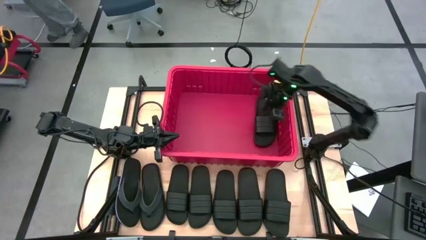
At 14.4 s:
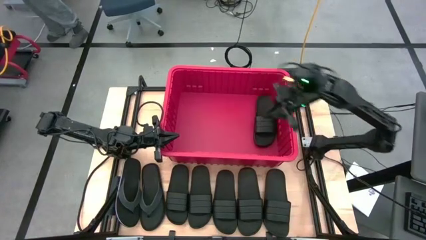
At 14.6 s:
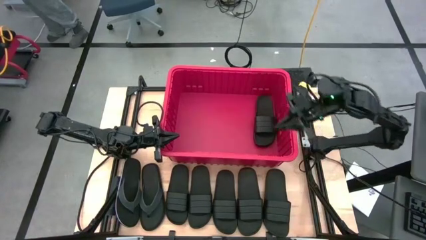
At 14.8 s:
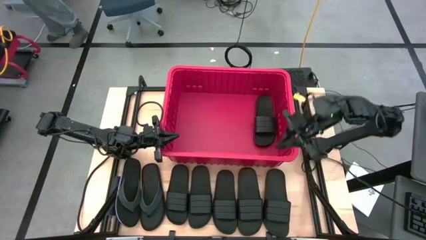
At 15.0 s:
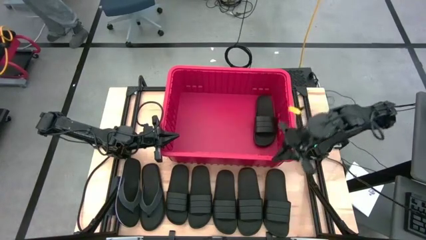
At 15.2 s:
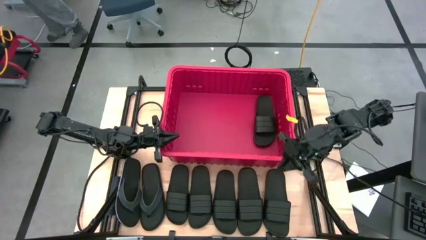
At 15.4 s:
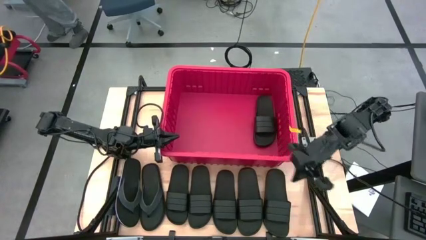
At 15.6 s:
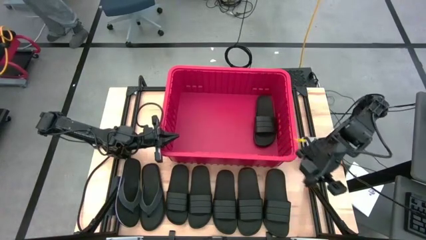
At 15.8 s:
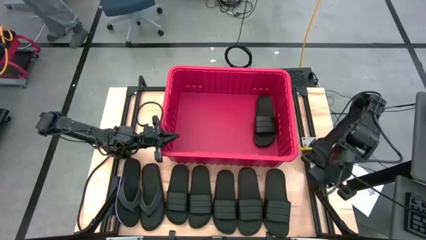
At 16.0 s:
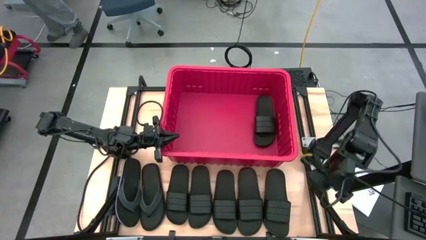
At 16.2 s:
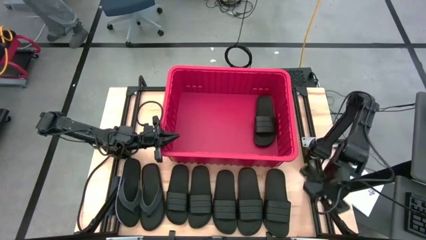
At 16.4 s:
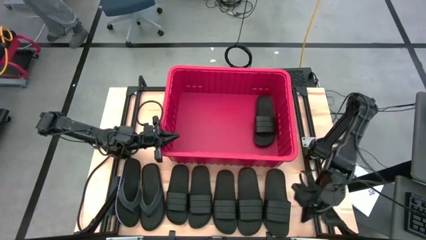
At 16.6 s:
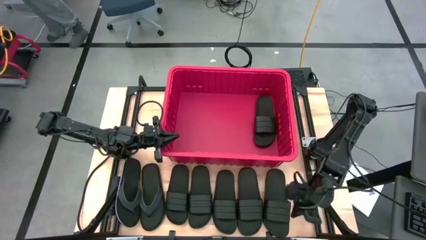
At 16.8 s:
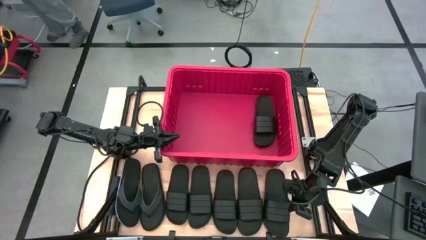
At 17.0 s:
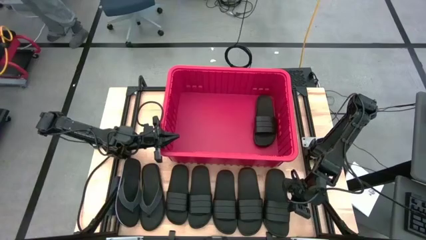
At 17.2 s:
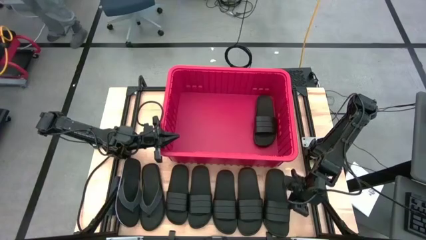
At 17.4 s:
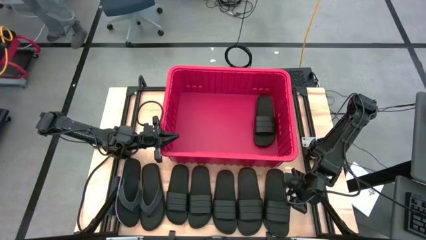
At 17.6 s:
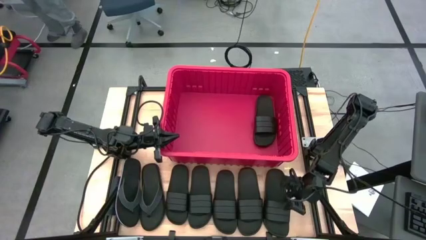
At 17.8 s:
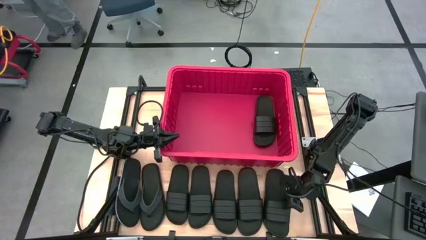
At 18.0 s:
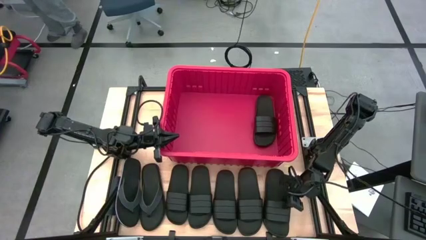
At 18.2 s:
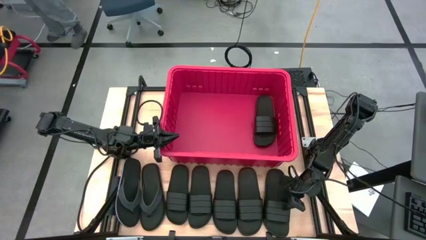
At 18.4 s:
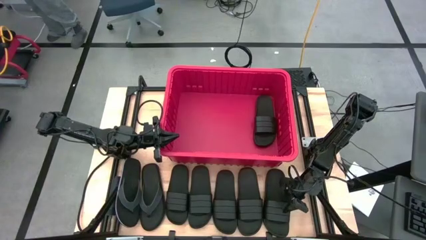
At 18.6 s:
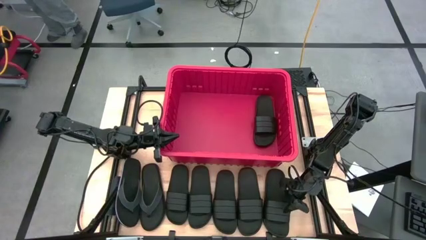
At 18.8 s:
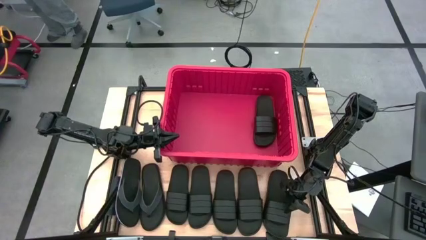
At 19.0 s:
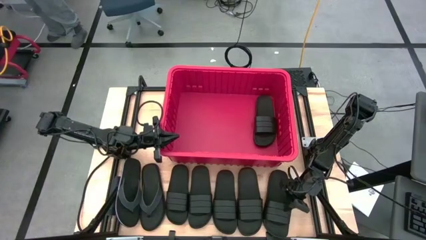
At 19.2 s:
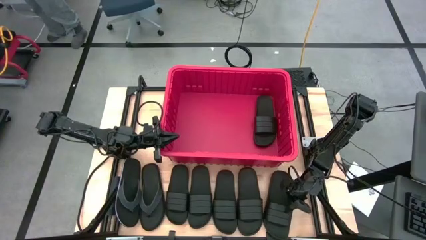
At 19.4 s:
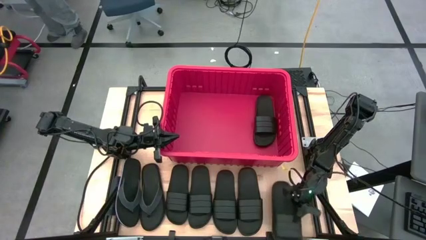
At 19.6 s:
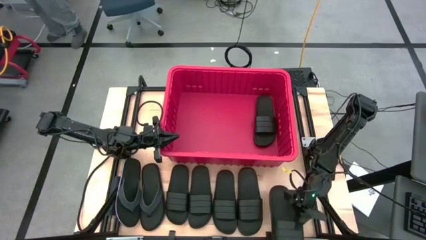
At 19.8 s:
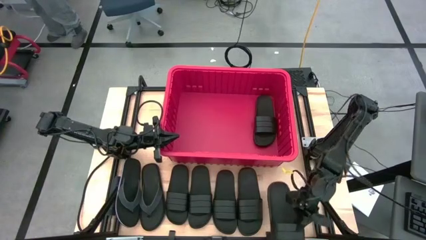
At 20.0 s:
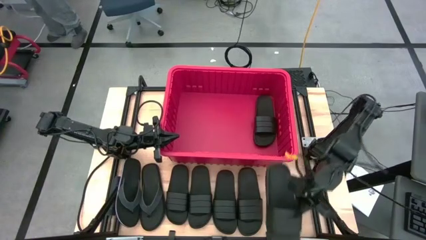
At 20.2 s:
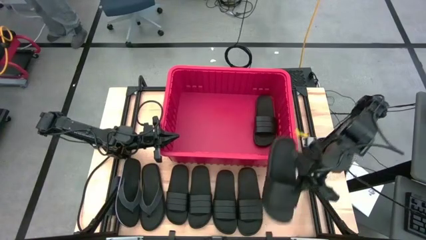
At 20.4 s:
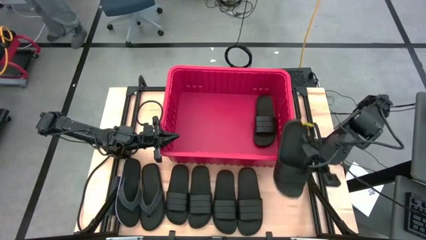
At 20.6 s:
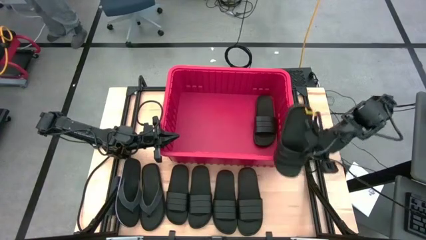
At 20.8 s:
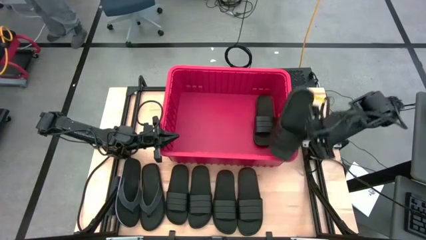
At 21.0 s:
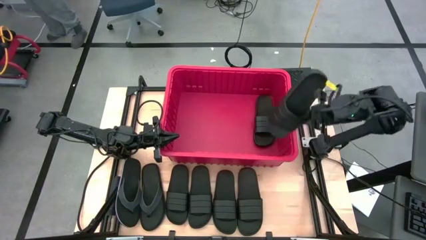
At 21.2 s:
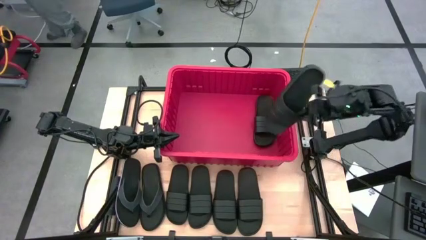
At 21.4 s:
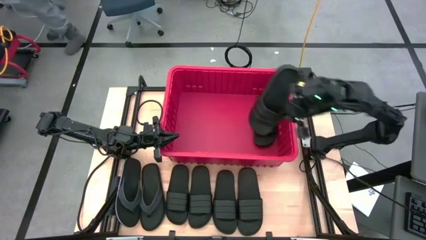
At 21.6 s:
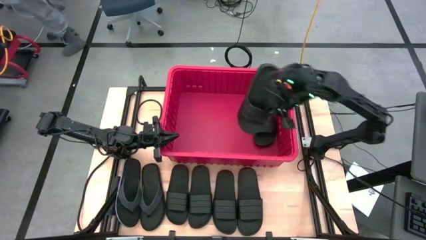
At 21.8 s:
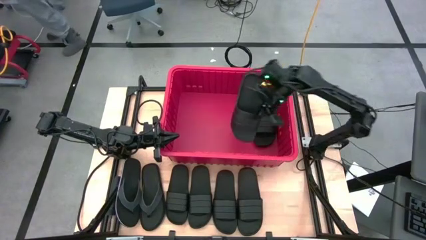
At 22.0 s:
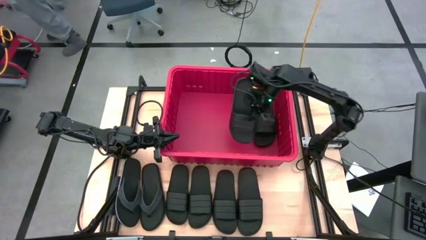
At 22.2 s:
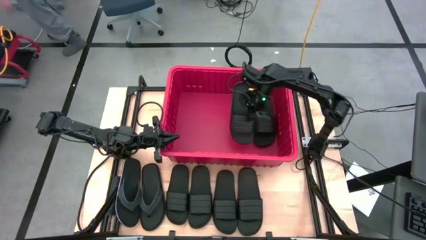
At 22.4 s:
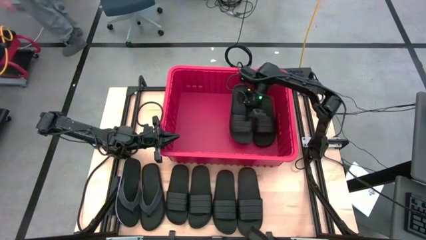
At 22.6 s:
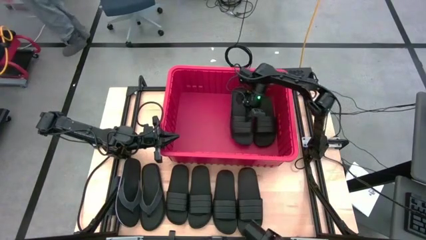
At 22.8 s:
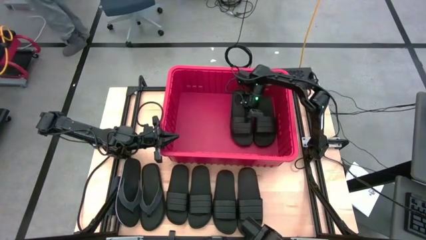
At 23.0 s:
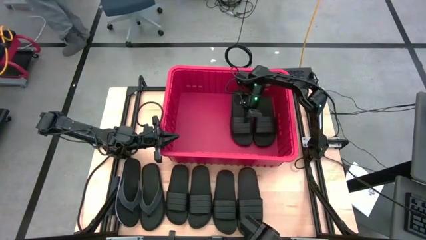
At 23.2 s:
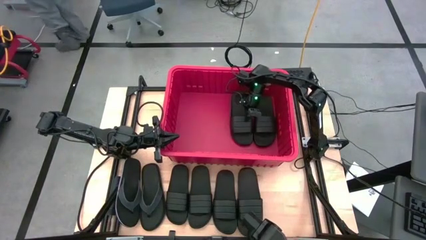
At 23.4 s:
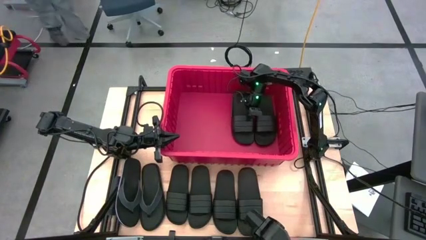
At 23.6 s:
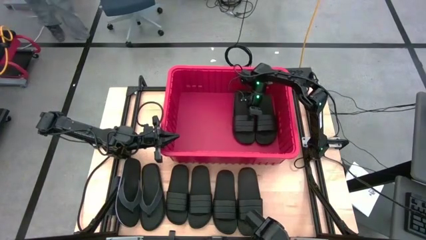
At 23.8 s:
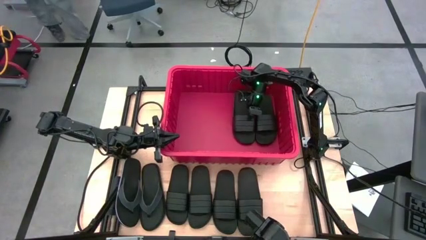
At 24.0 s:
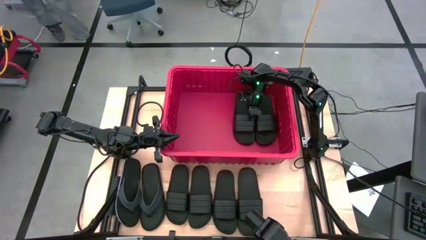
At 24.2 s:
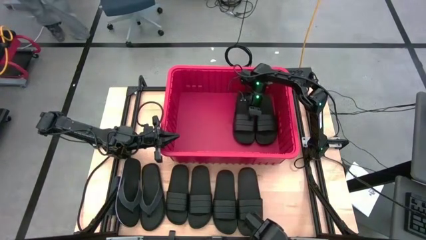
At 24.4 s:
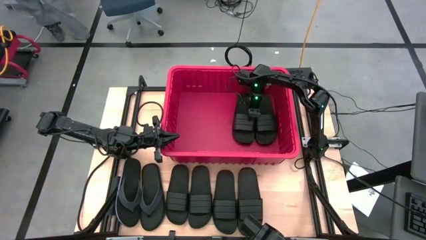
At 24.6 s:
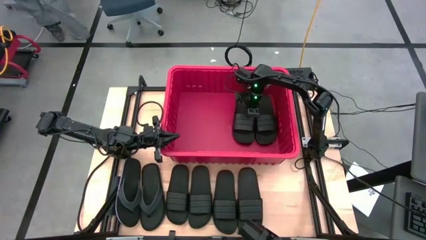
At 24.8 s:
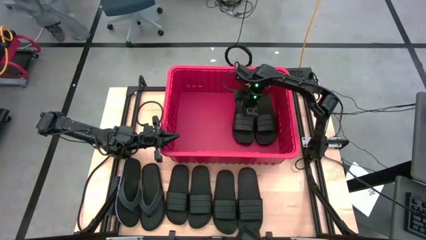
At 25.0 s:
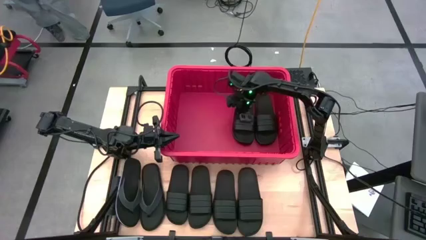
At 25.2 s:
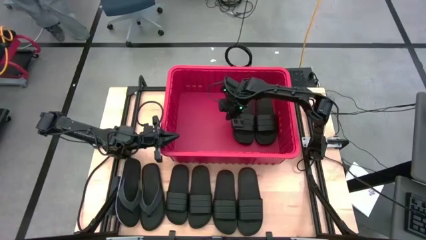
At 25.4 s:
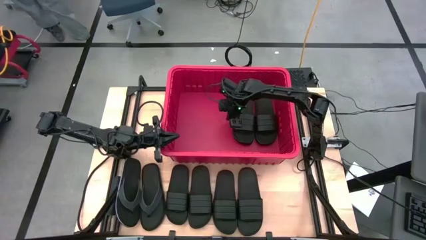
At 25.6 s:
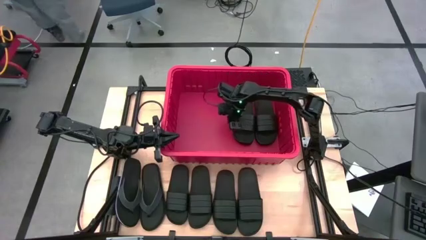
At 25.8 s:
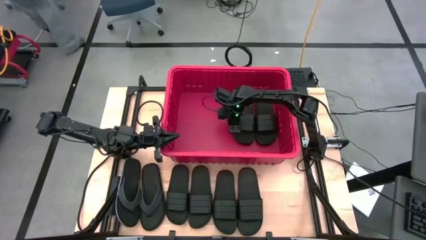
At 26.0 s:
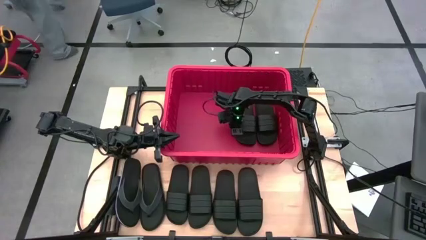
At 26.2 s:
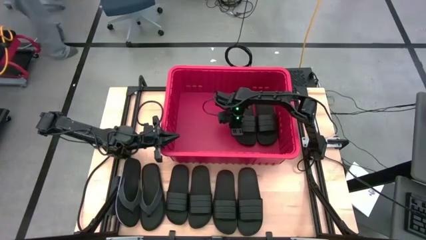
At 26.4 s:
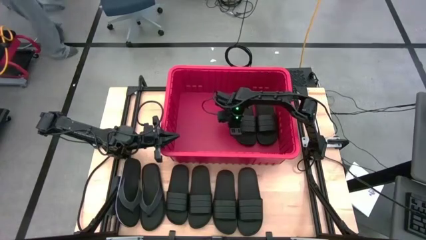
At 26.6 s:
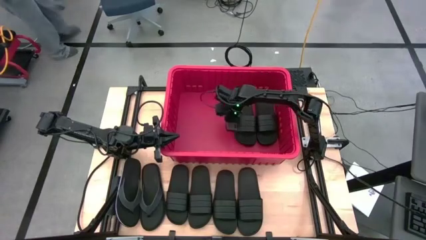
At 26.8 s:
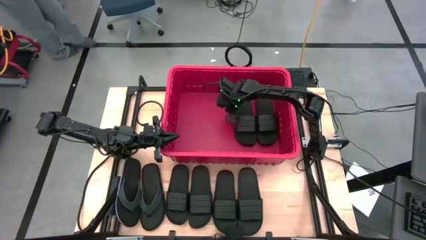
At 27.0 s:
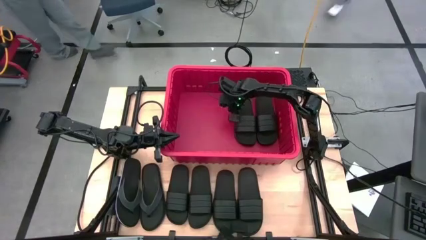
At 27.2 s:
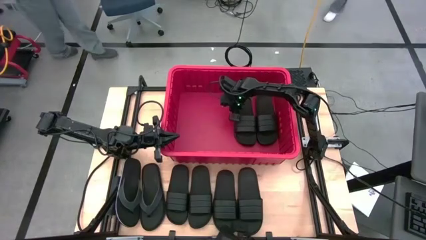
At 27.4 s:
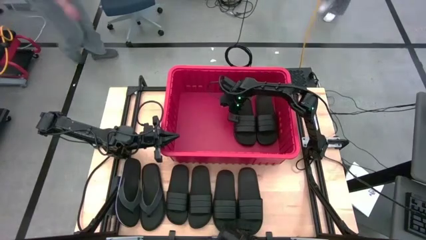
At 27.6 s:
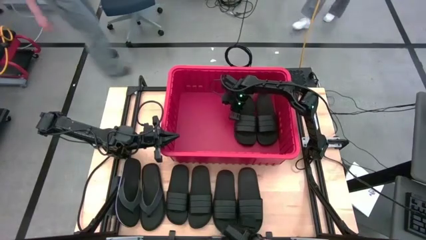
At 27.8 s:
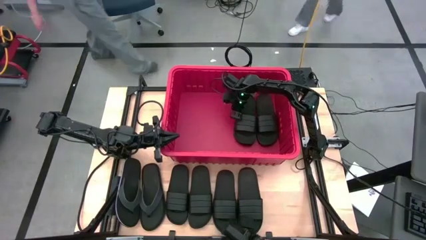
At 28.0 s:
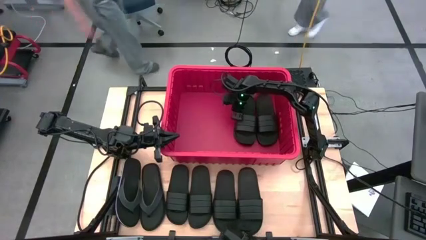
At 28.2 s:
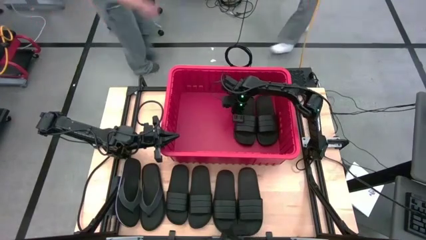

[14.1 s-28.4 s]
Task: Pick and place slides into bin
Put the black slide into the red bin
